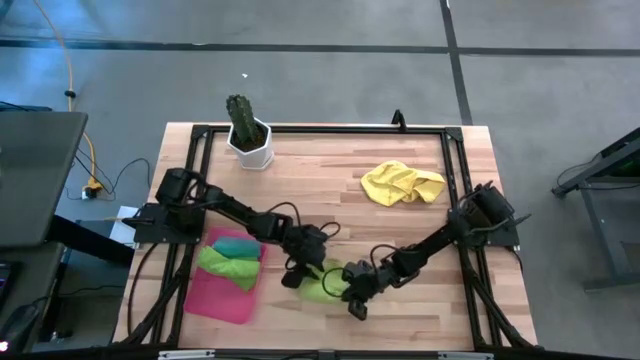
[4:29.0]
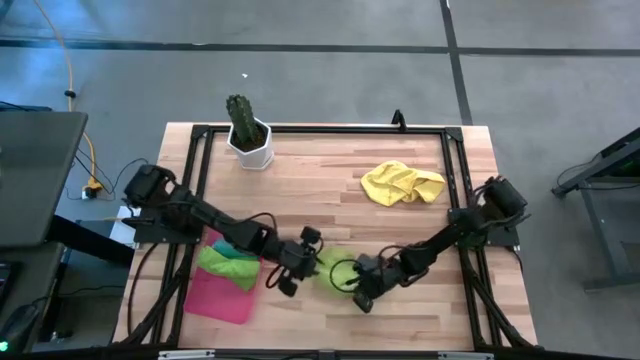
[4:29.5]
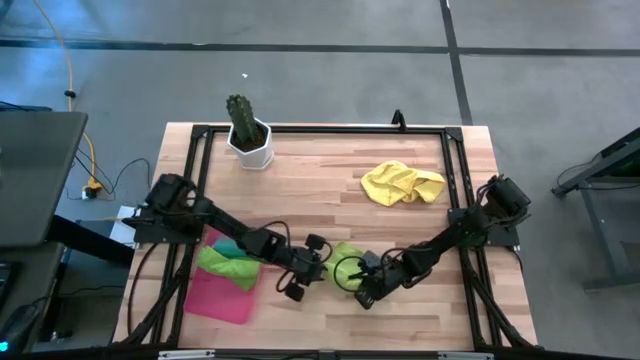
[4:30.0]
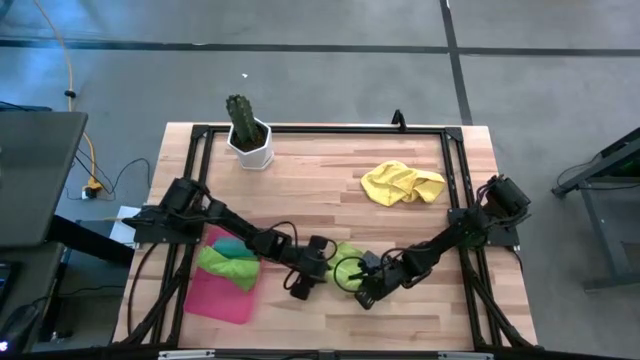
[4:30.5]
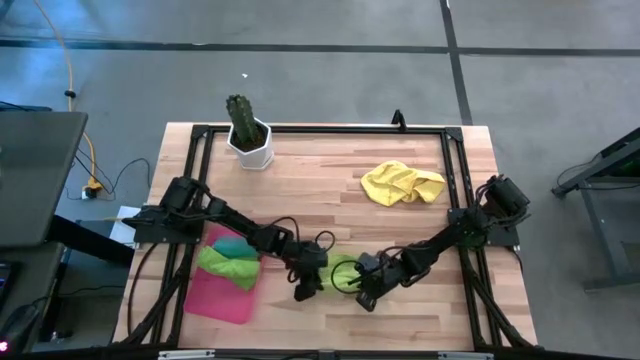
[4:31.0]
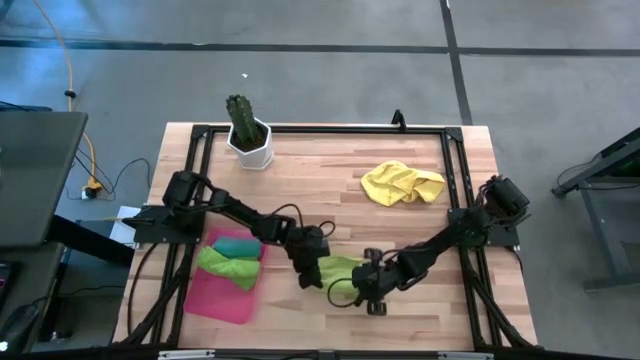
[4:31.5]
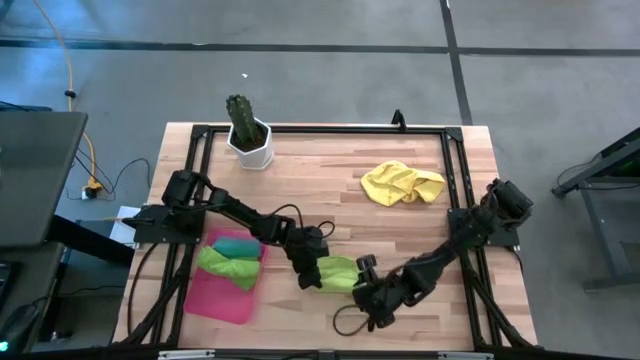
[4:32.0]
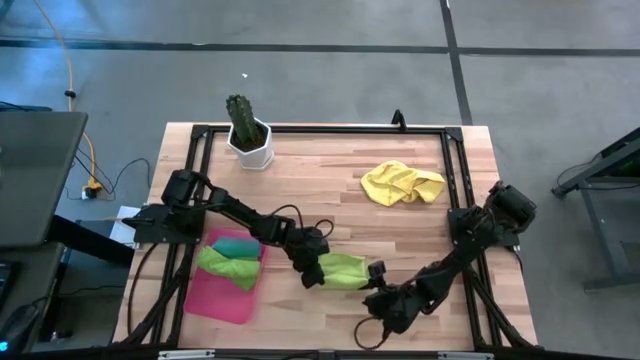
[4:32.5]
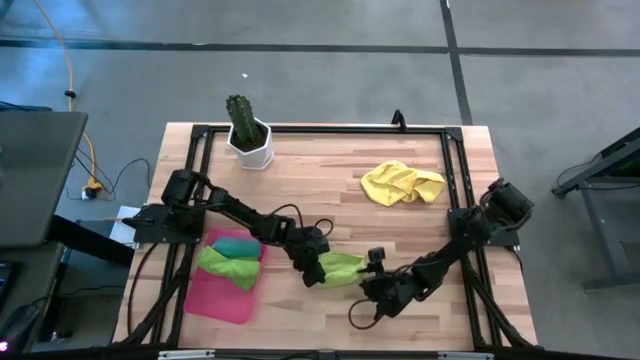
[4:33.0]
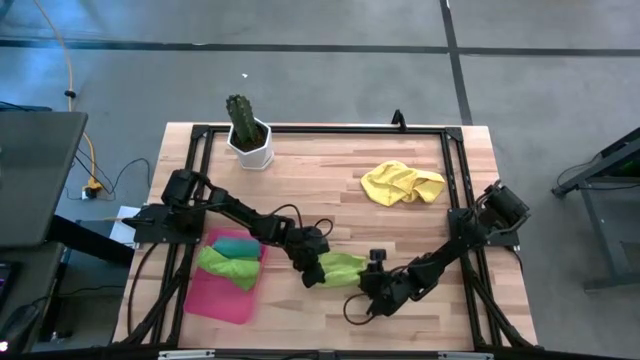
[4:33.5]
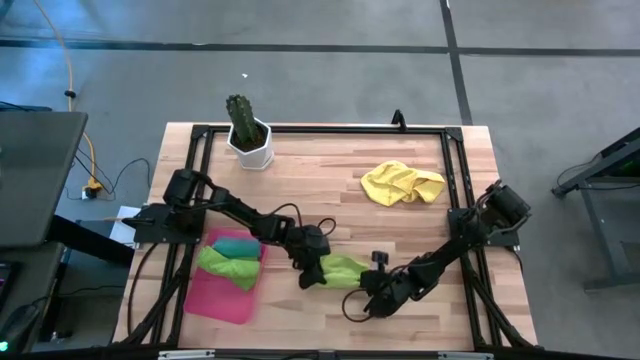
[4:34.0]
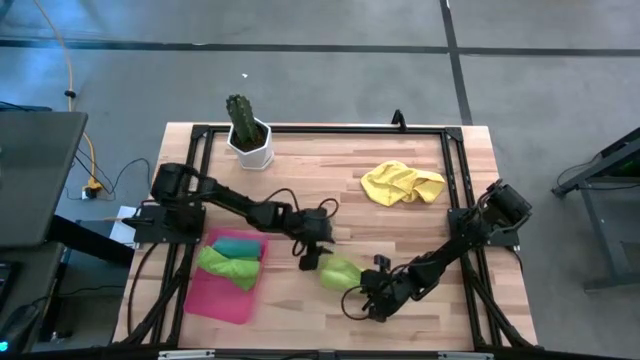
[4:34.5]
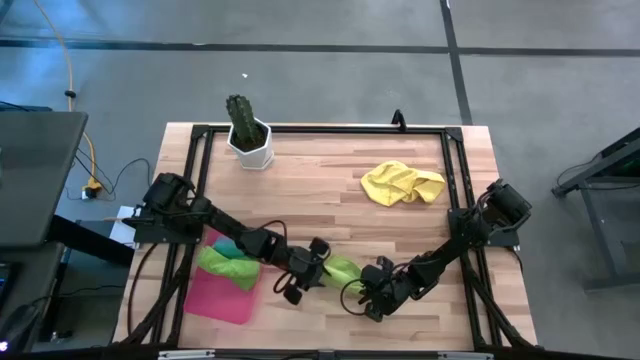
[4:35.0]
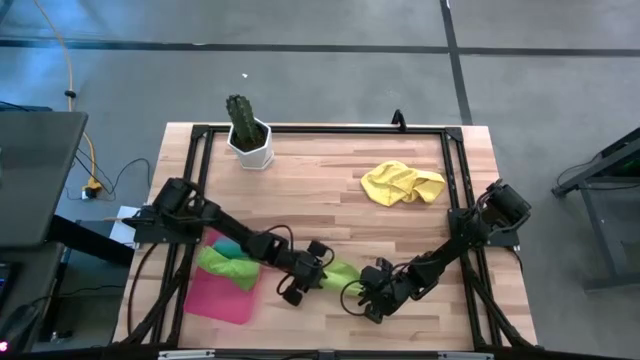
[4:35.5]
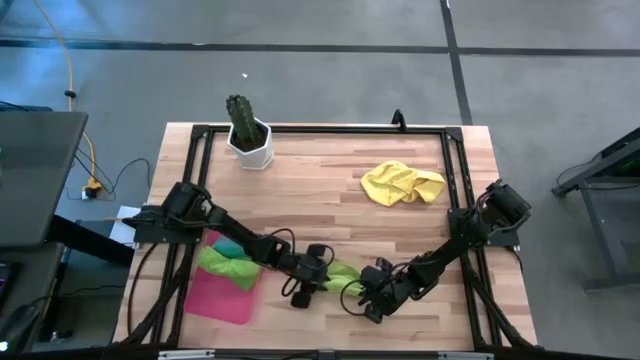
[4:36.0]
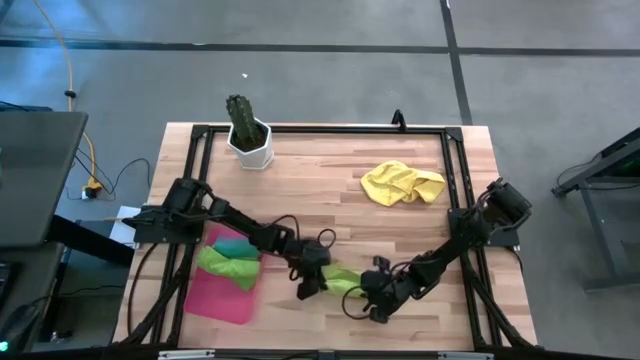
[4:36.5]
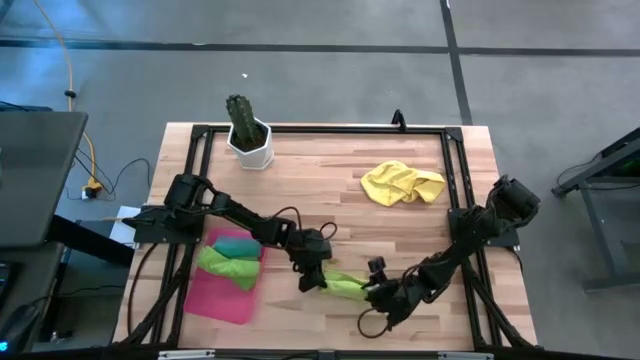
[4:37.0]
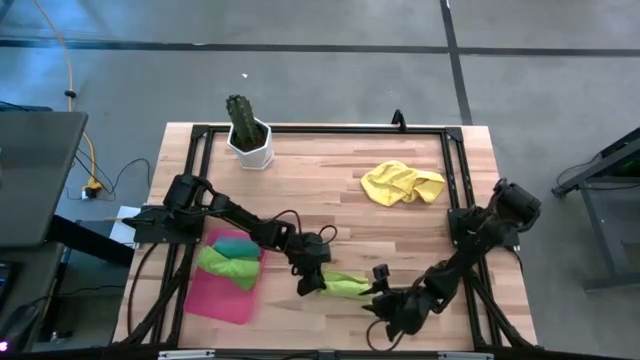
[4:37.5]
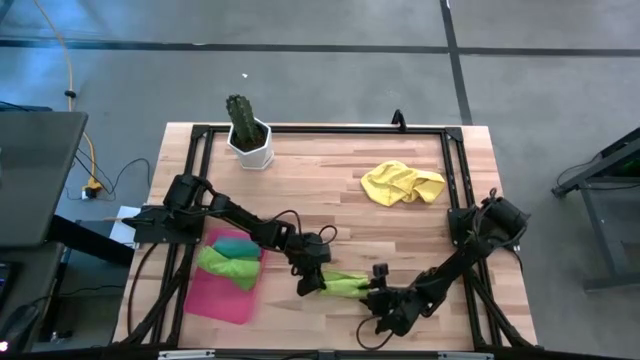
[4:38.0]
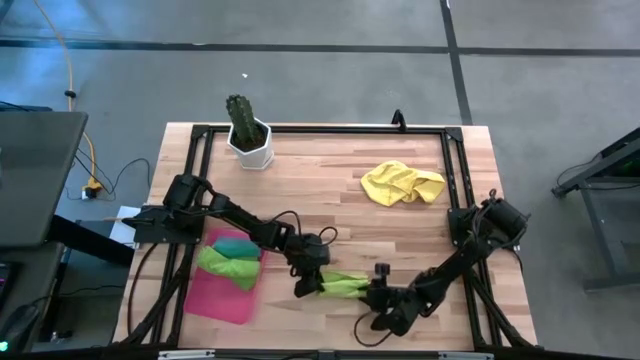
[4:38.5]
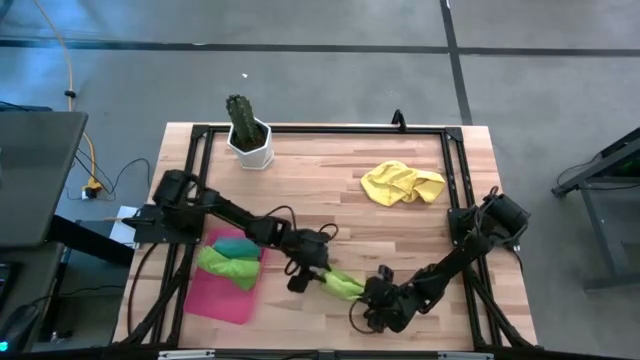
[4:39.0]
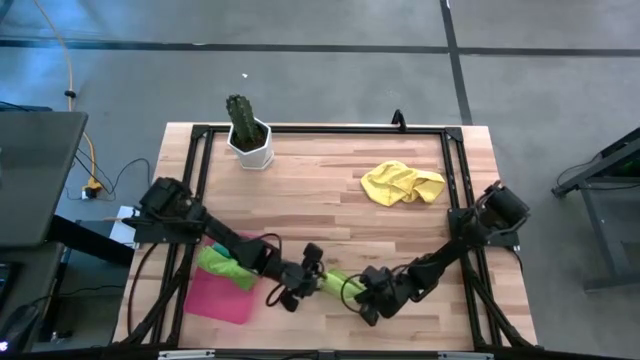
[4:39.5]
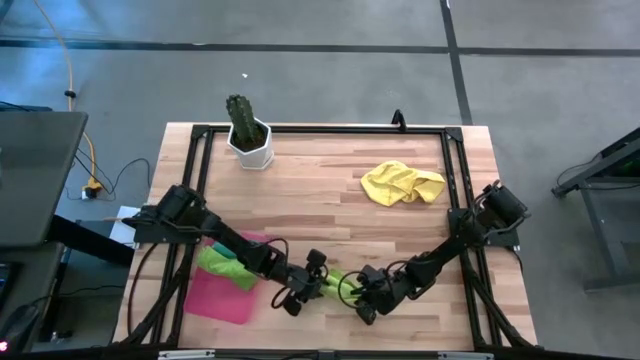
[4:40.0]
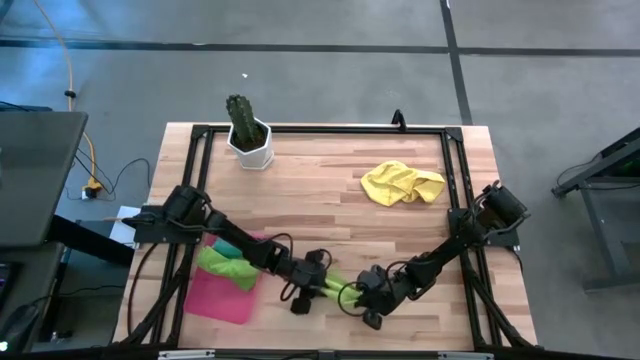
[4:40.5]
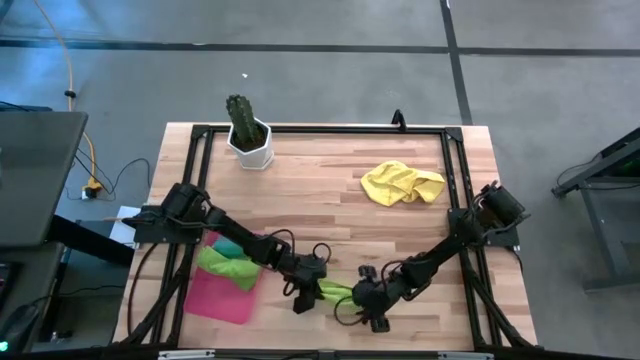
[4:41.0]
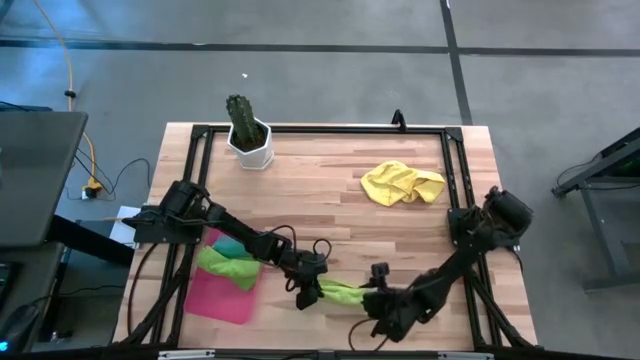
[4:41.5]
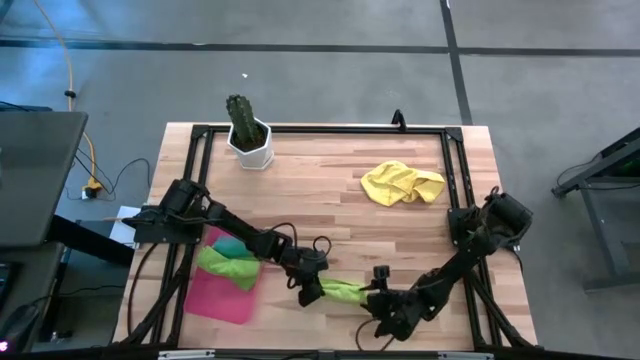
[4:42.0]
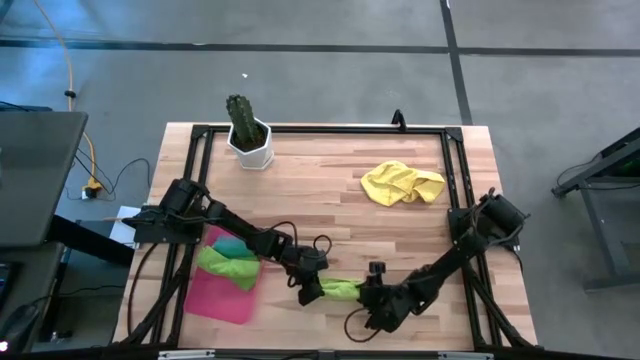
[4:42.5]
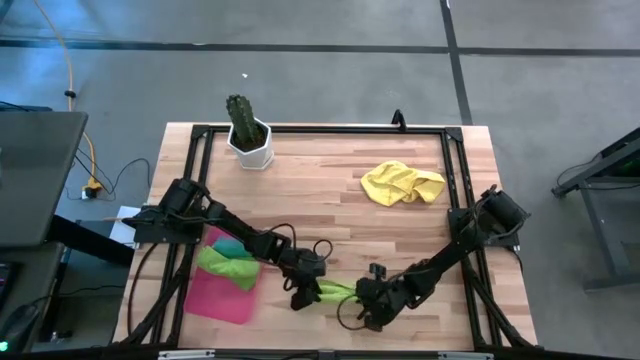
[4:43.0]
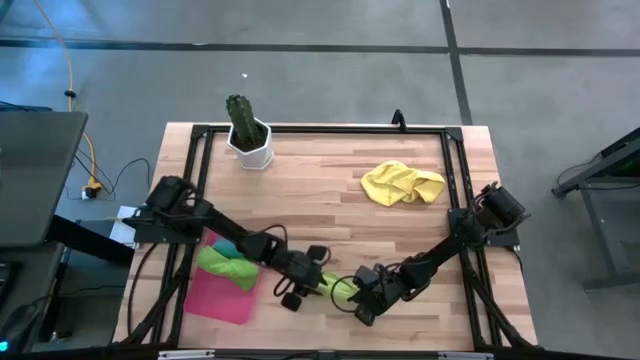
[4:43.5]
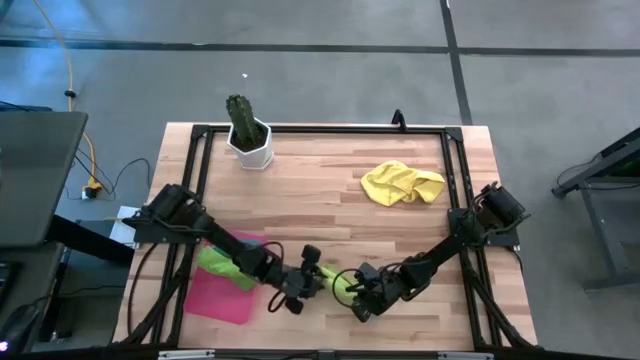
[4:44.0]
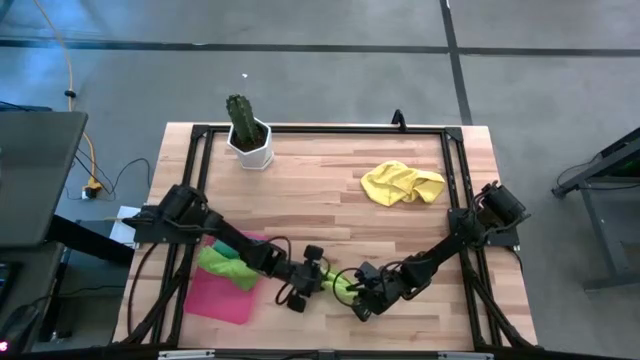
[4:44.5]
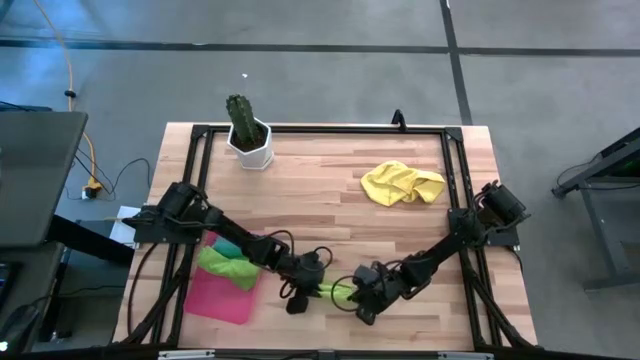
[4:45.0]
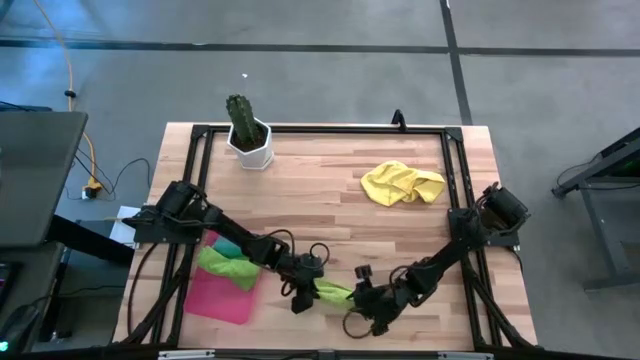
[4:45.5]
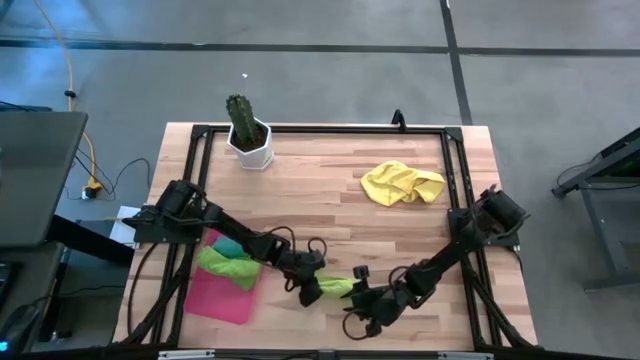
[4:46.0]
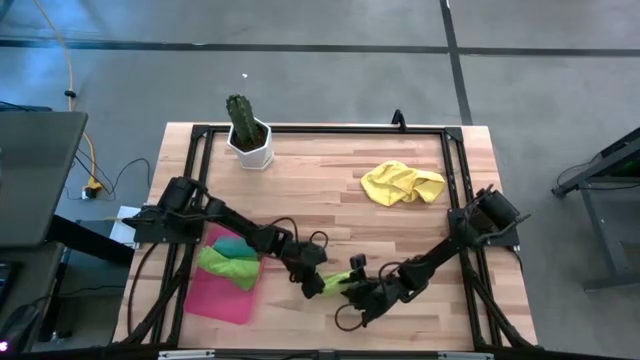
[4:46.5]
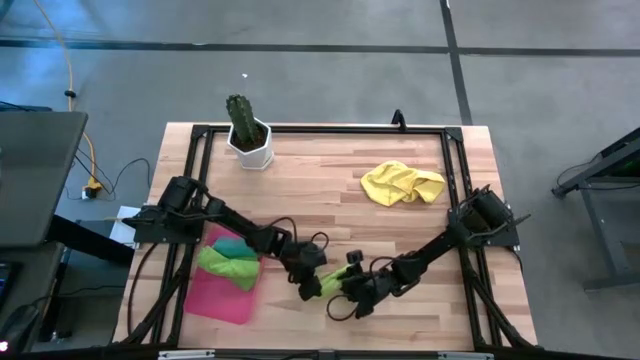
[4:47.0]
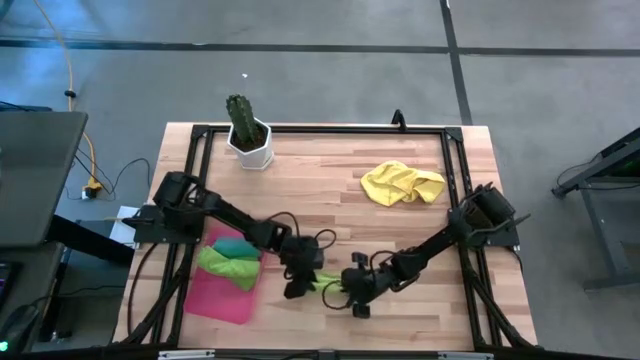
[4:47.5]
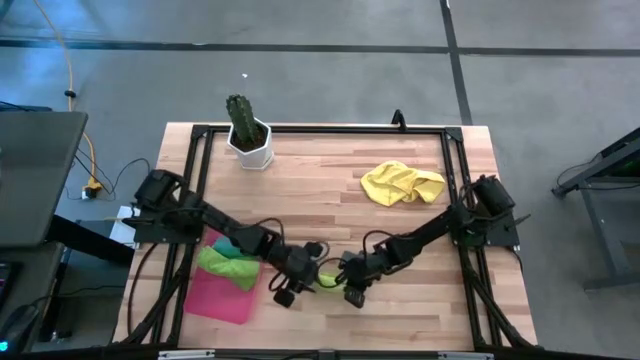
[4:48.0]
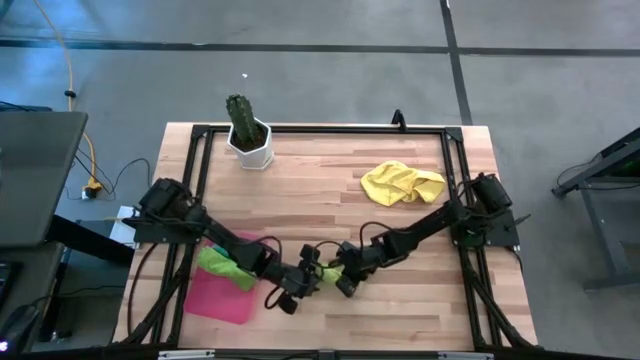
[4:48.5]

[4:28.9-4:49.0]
Task: Roll microfiber towels into tight, uniform cylinder then place into a basket
Roll the light green towel
